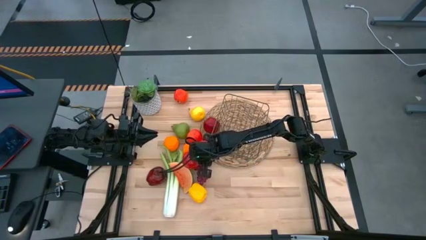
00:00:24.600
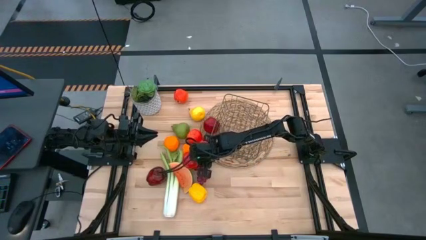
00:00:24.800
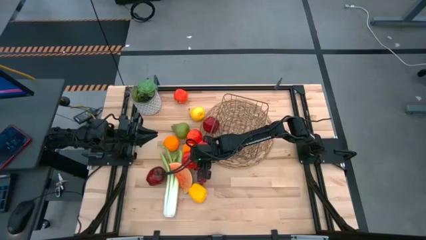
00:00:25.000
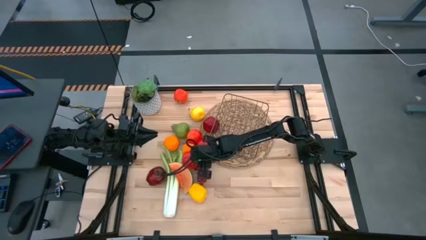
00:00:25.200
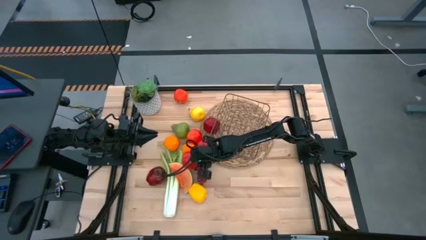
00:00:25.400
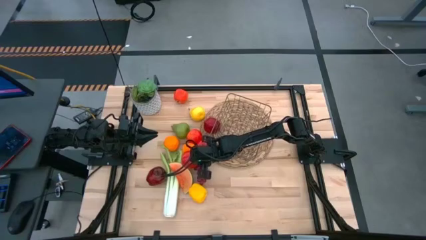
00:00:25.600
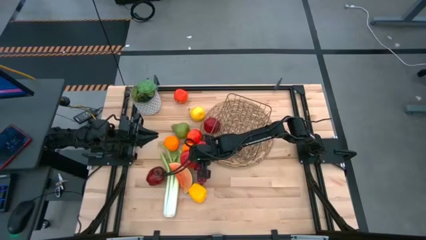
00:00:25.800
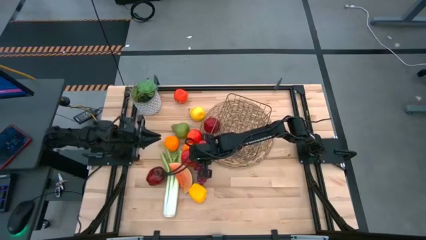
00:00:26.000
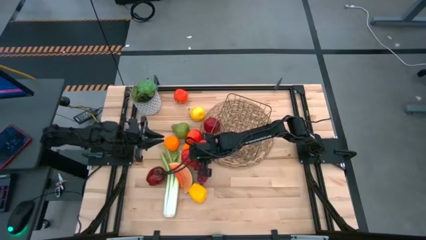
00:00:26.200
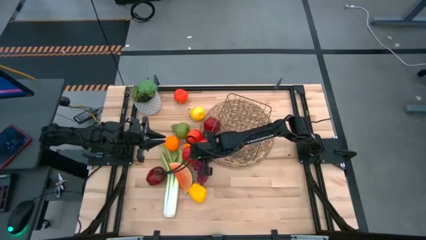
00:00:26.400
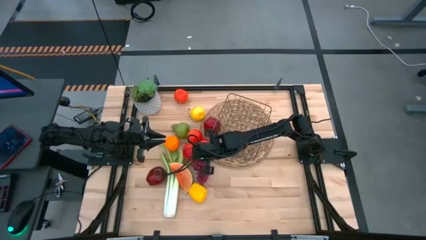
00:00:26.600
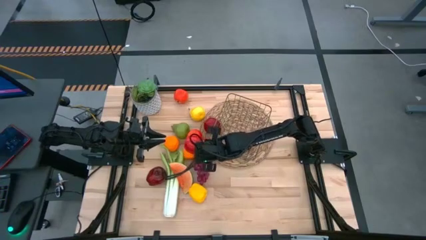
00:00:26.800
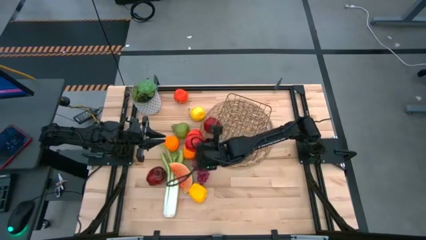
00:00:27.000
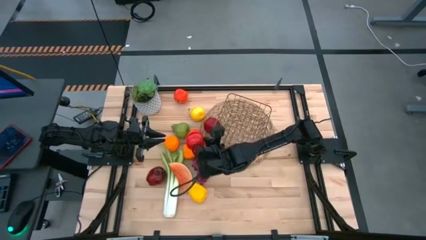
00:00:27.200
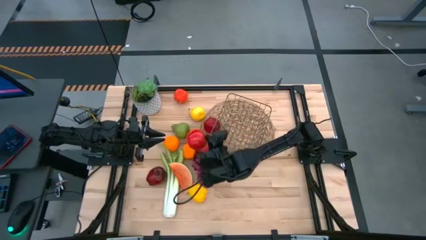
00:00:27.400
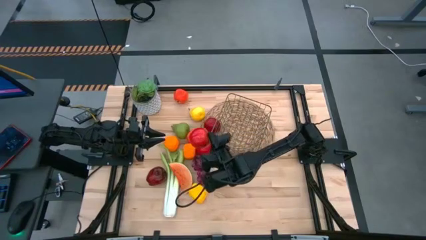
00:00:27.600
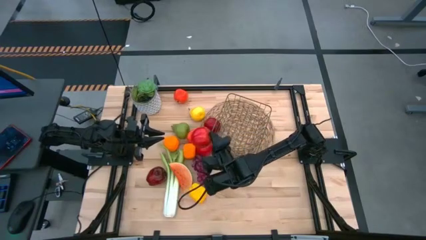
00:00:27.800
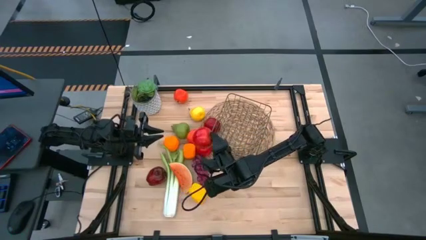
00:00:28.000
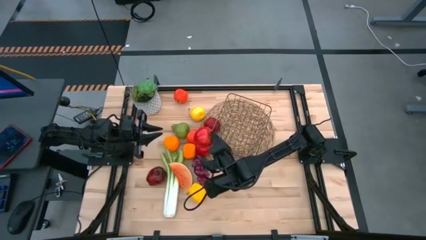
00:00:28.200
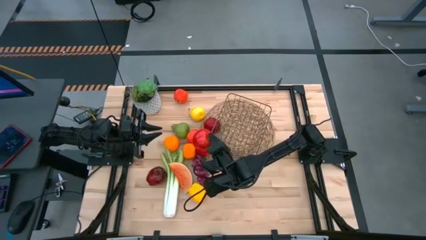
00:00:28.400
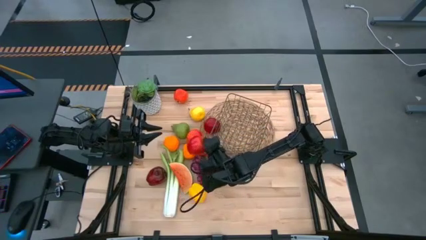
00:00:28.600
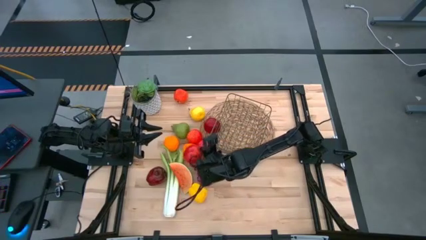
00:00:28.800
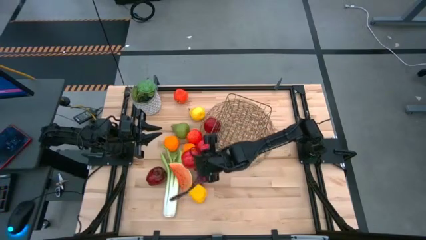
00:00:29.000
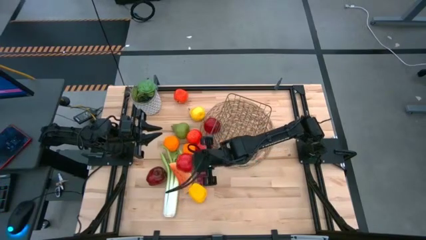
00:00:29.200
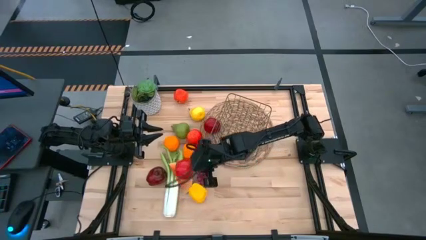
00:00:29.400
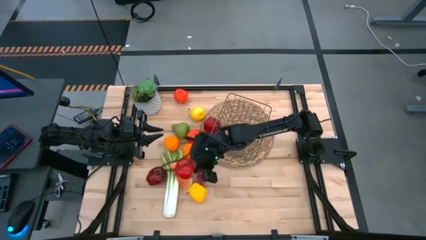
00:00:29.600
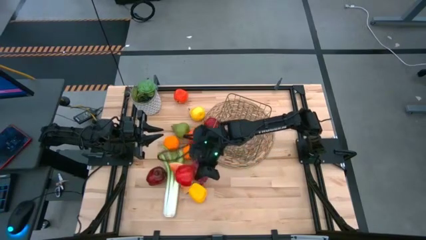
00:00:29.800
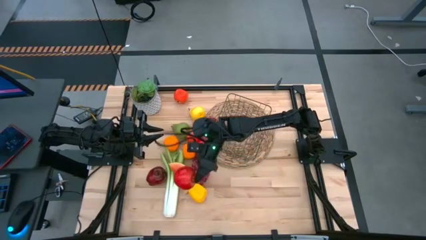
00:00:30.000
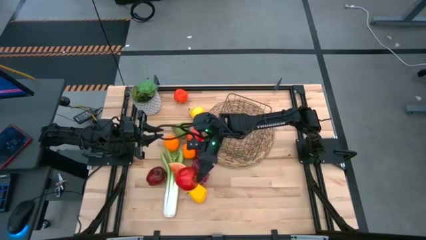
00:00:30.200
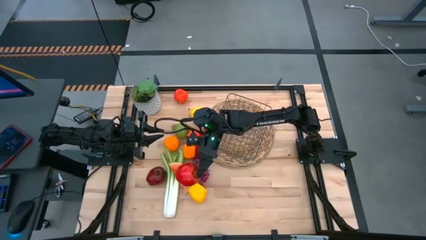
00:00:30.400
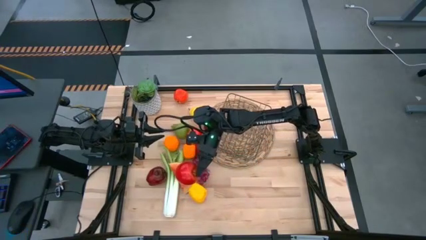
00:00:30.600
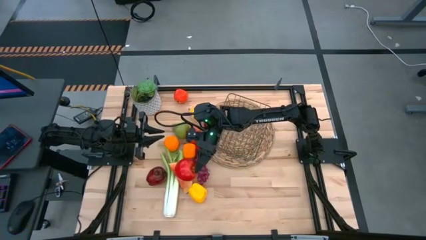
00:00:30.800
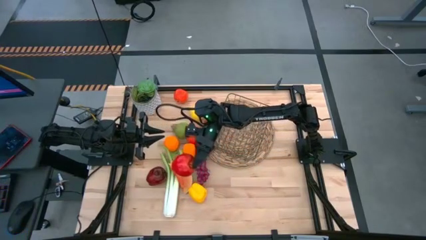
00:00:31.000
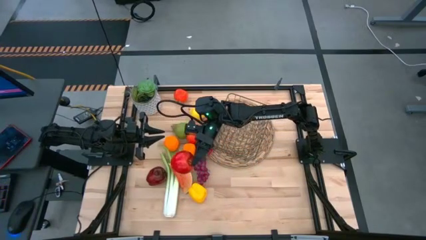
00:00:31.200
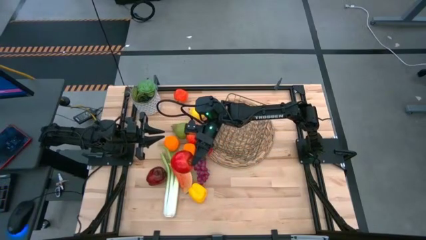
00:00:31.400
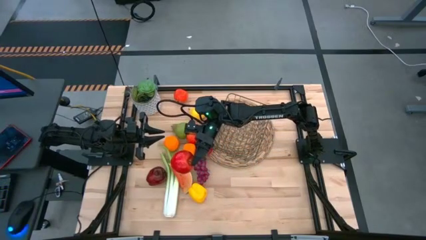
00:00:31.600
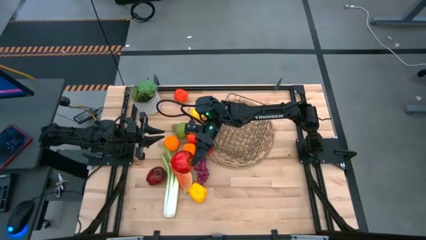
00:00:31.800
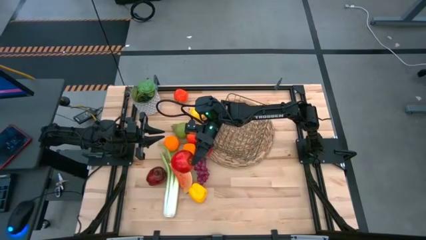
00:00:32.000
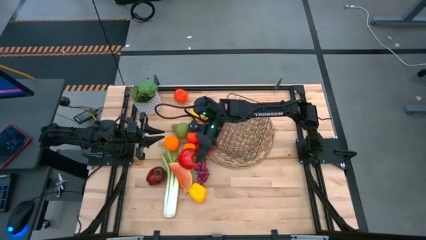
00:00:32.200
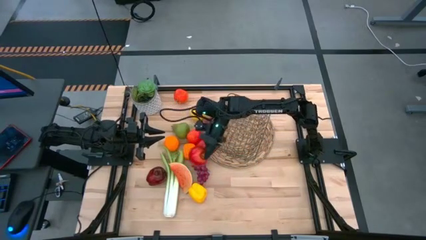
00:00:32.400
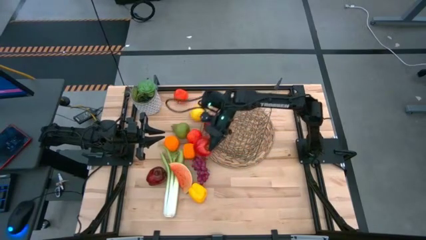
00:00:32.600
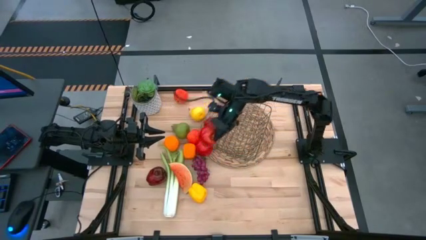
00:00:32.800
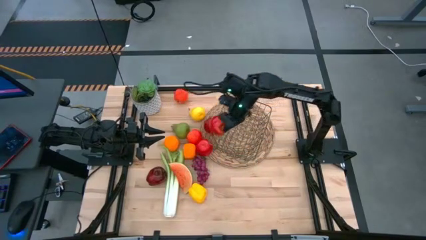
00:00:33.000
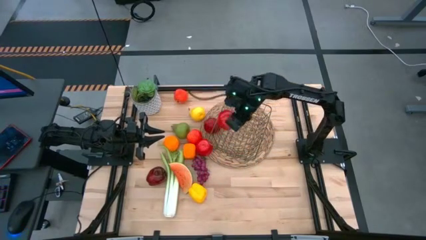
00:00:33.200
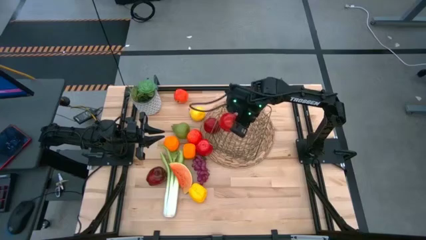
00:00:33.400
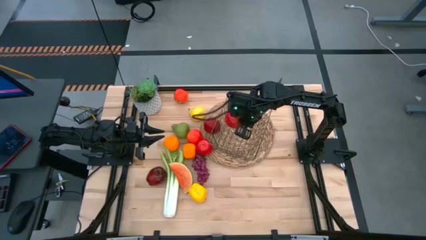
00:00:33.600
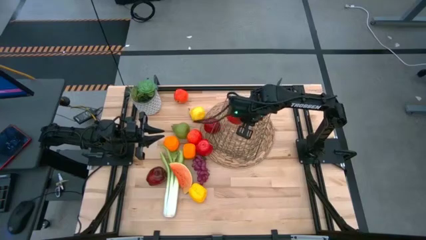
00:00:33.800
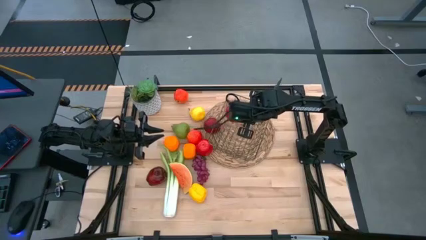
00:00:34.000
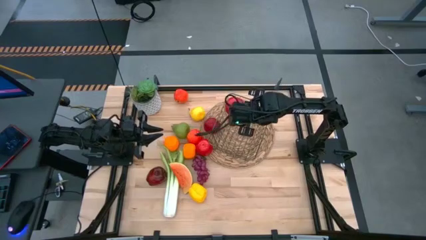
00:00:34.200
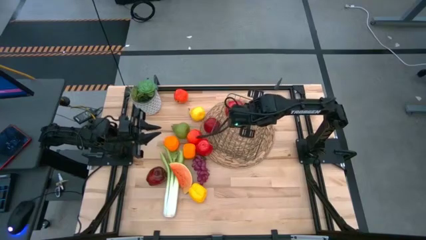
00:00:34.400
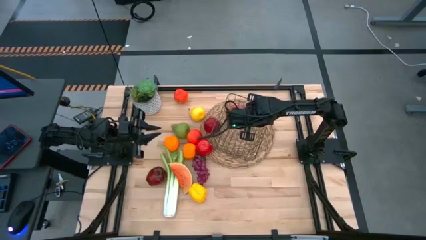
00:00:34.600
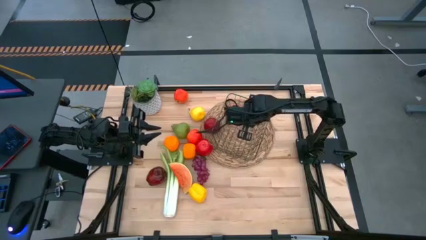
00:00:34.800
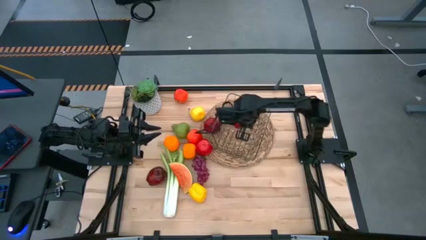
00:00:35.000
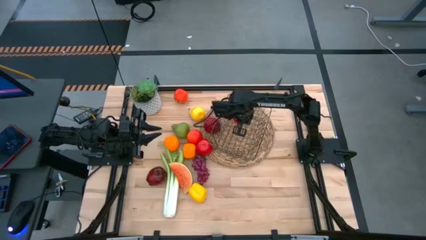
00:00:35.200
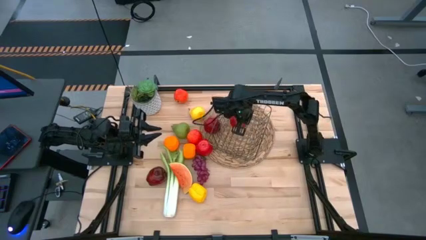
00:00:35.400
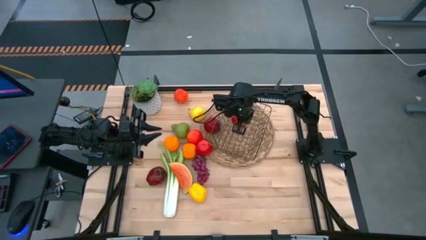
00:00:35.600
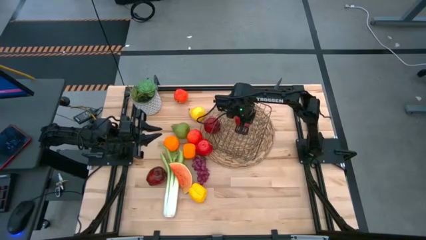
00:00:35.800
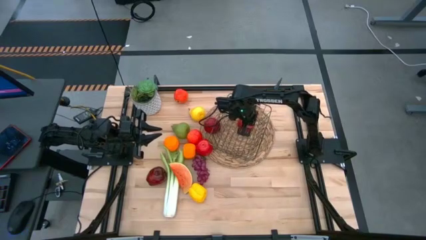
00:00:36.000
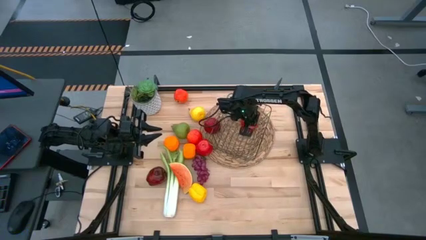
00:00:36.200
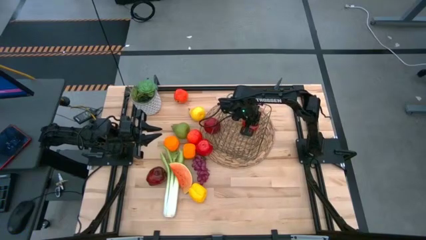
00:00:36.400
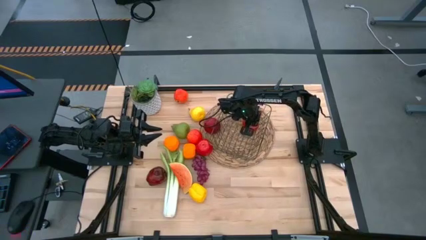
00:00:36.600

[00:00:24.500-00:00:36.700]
Task: Build produce basket
Put the red apple into the gold wire basket

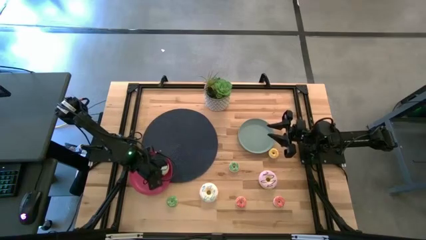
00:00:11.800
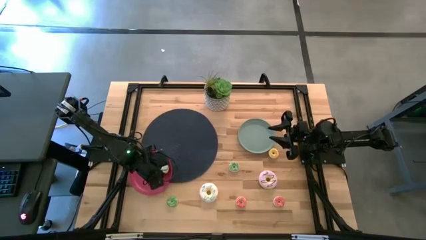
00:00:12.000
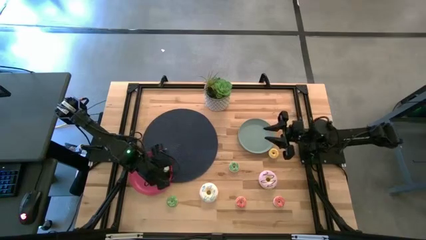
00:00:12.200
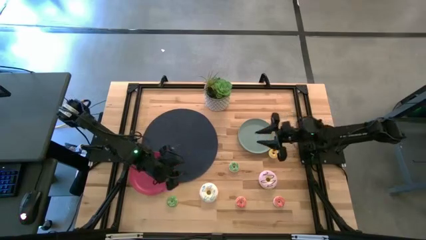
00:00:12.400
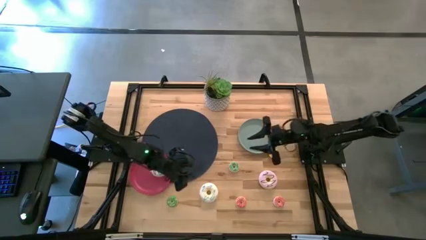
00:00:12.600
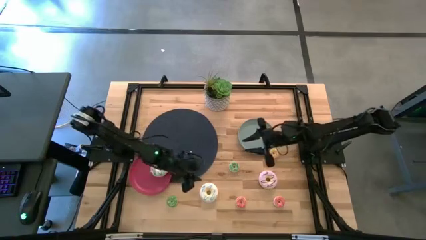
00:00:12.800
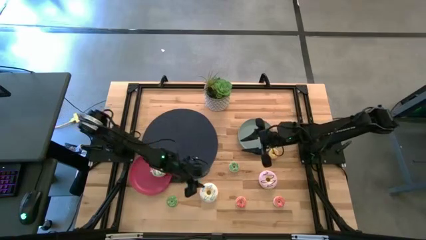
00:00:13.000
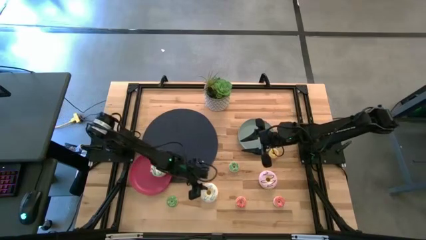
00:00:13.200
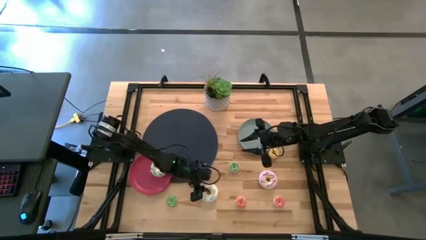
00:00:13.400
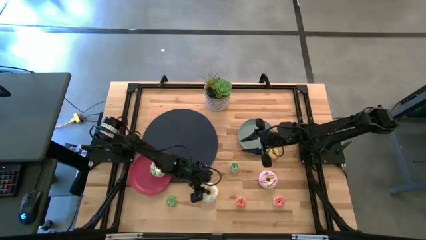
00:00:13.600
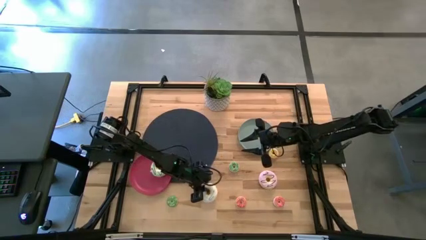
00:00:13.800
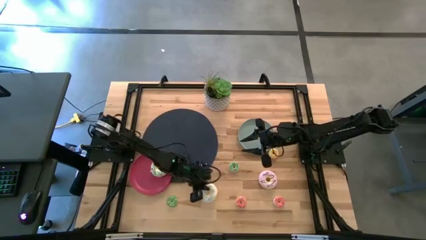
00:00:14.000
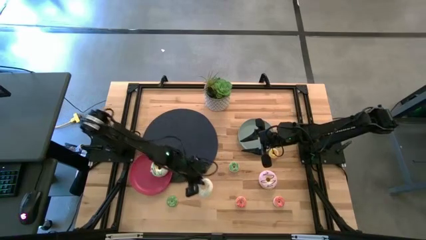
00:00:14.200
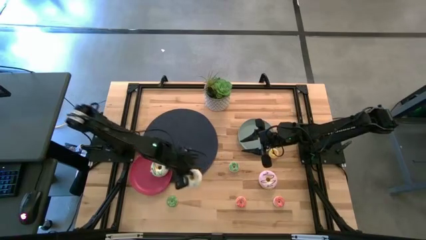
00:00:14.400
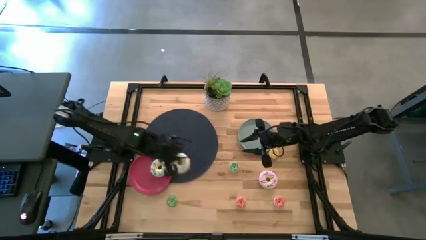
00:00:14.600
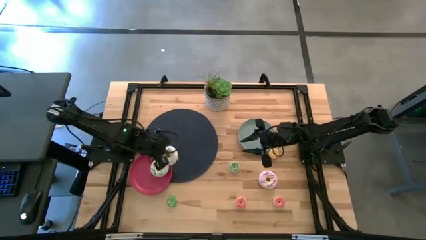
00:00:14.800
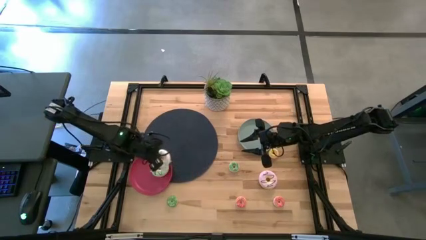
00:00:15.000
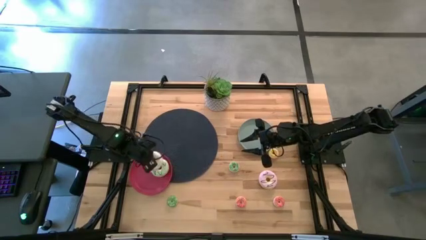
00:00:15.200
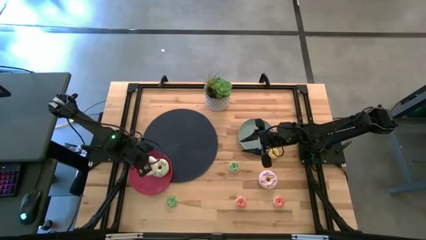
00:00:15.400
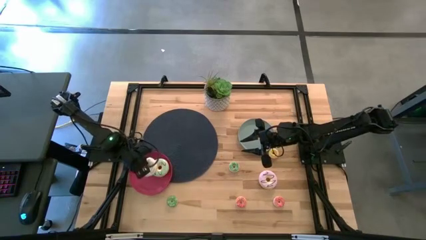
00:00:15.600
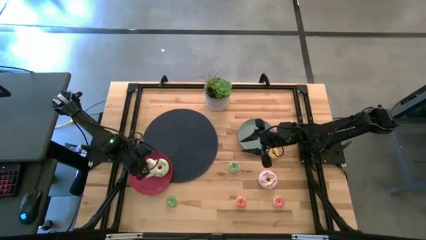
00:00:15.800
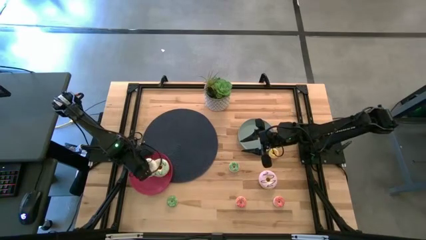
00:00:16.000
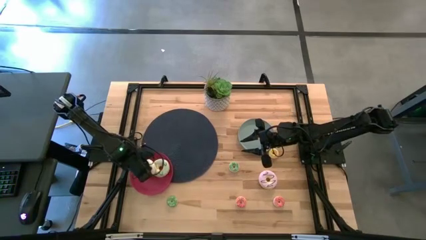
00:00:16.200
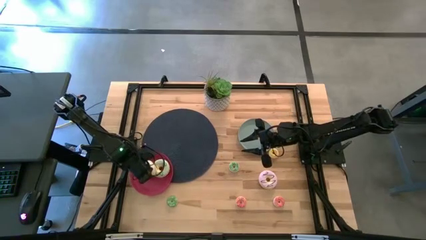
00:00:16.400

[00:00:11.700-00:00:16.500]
Task: Pick & Place donuts
Put the large white donut on the red plate
